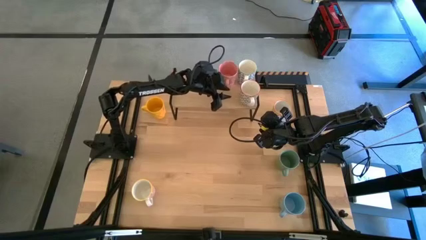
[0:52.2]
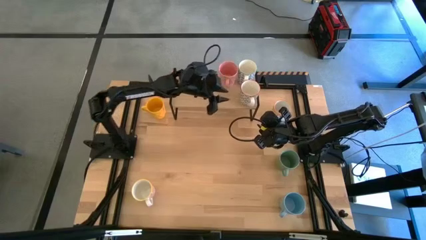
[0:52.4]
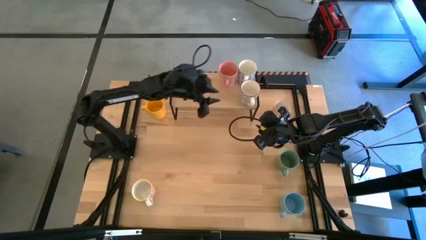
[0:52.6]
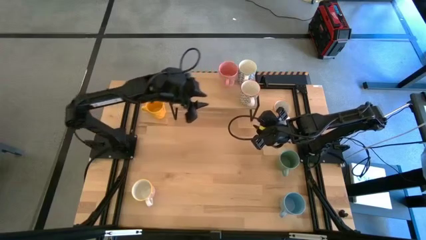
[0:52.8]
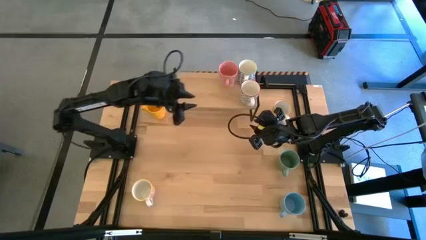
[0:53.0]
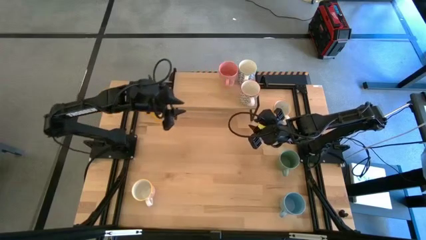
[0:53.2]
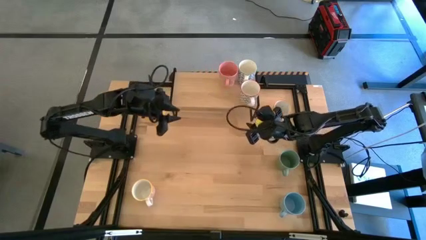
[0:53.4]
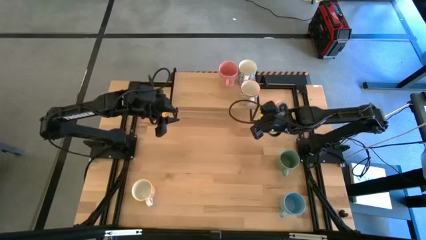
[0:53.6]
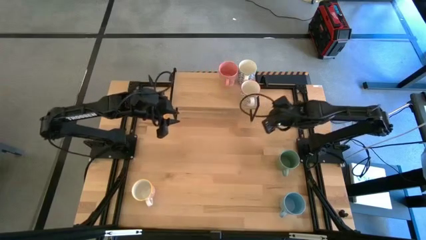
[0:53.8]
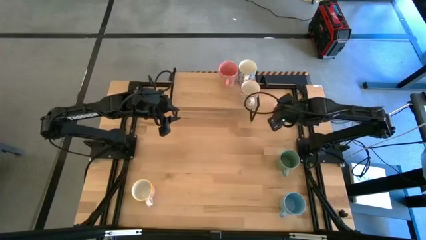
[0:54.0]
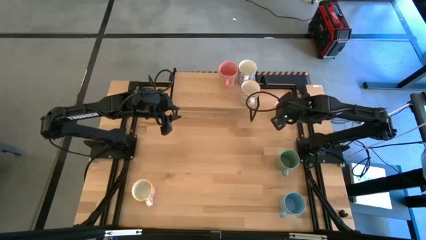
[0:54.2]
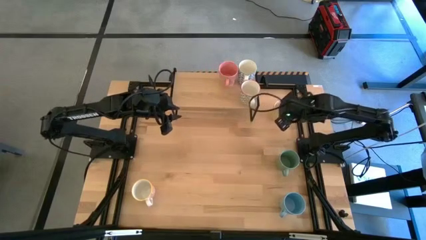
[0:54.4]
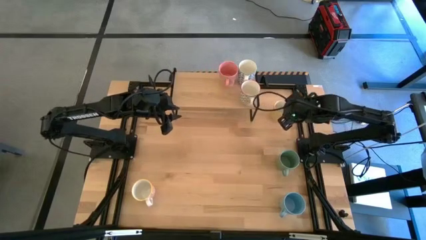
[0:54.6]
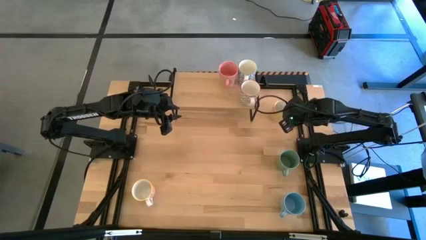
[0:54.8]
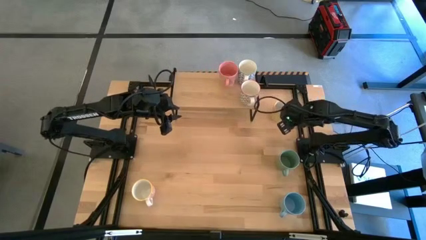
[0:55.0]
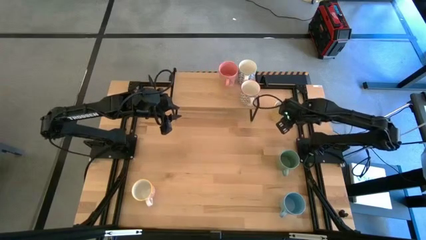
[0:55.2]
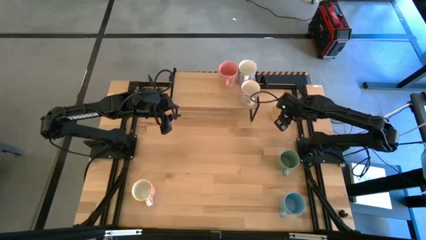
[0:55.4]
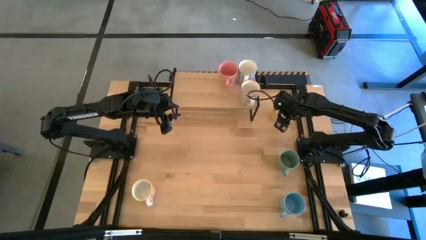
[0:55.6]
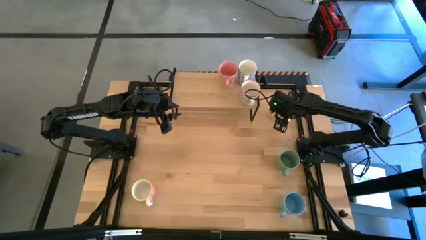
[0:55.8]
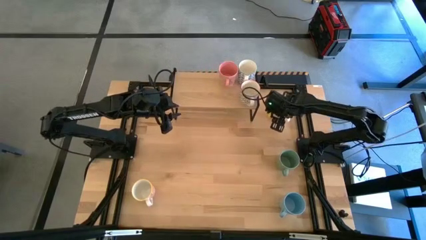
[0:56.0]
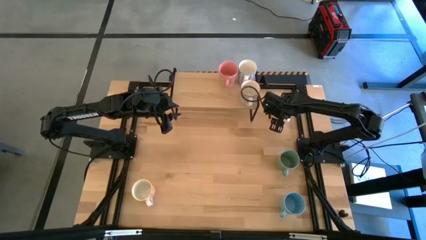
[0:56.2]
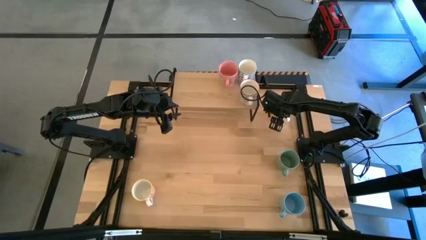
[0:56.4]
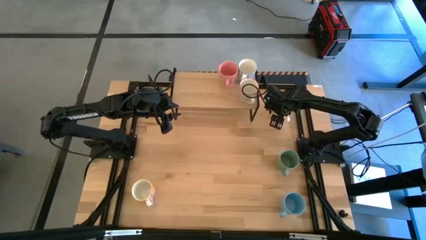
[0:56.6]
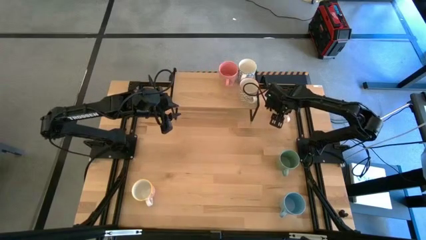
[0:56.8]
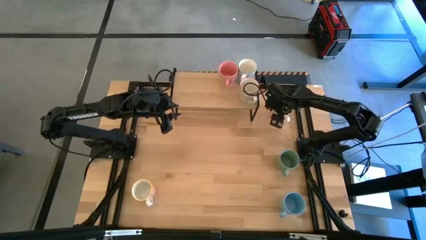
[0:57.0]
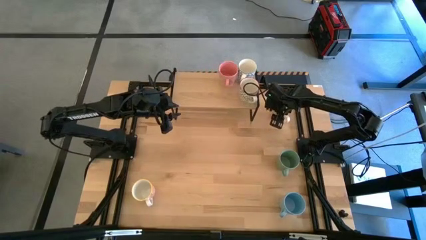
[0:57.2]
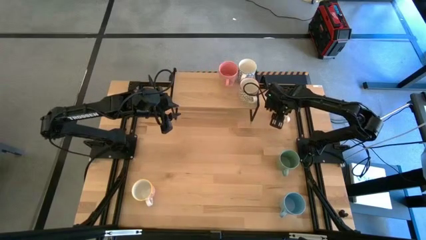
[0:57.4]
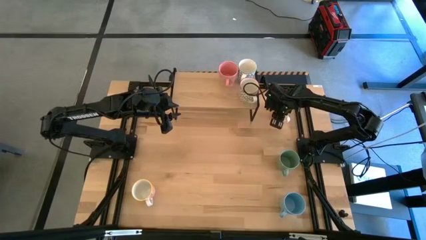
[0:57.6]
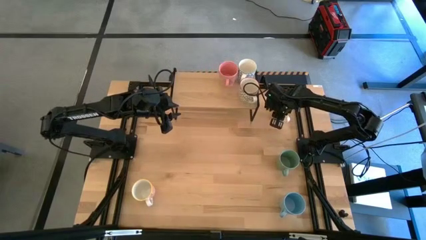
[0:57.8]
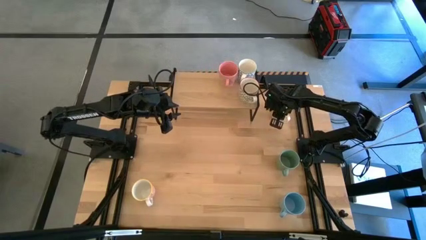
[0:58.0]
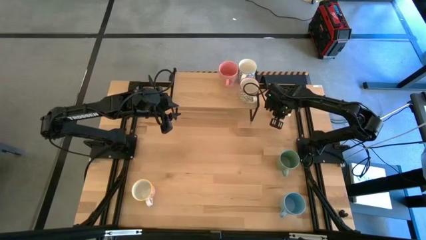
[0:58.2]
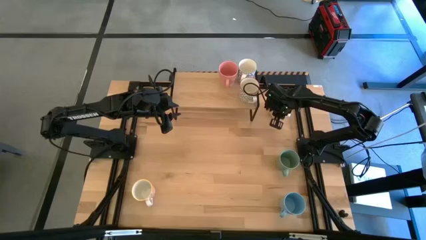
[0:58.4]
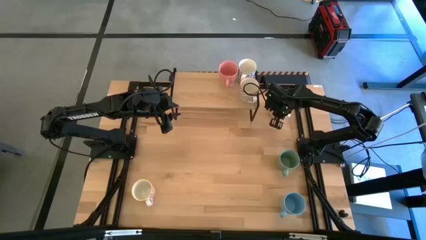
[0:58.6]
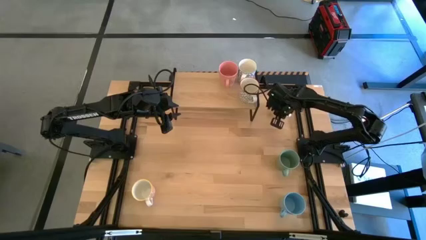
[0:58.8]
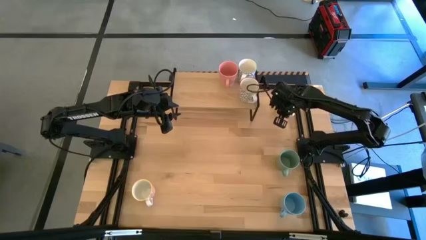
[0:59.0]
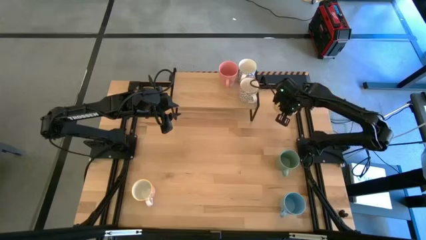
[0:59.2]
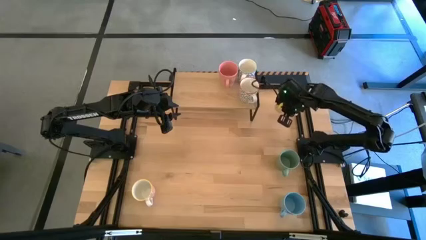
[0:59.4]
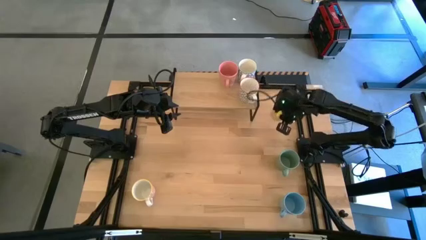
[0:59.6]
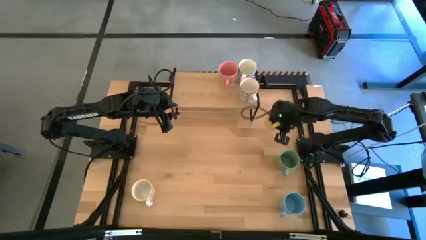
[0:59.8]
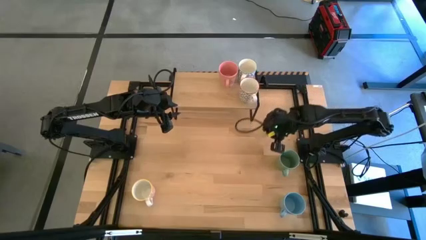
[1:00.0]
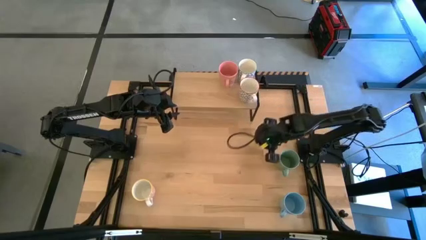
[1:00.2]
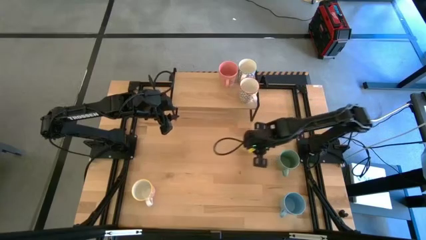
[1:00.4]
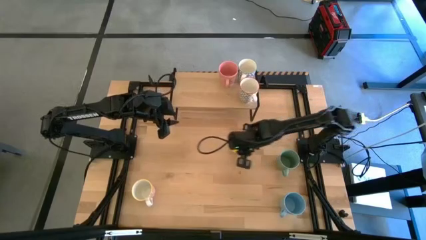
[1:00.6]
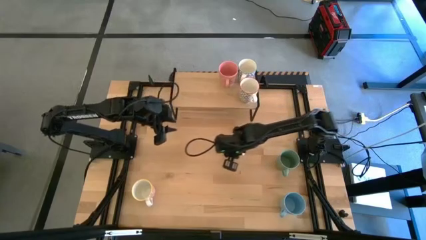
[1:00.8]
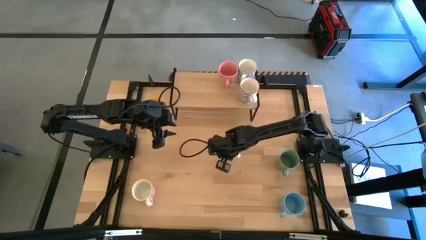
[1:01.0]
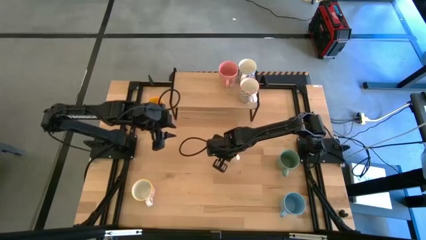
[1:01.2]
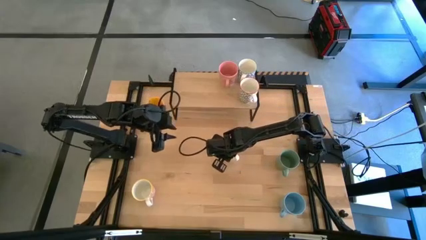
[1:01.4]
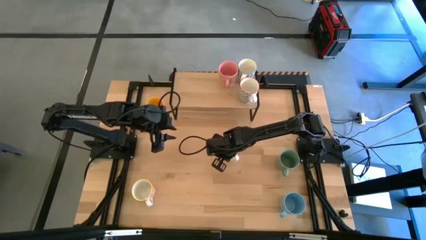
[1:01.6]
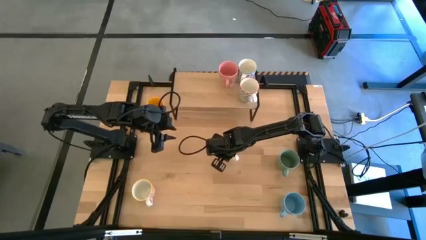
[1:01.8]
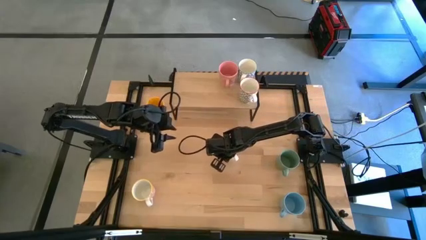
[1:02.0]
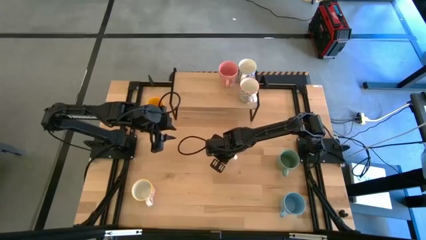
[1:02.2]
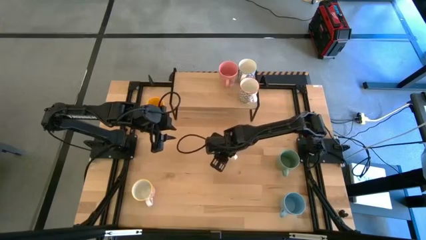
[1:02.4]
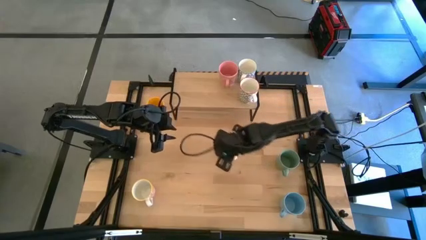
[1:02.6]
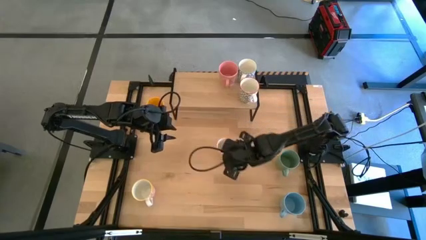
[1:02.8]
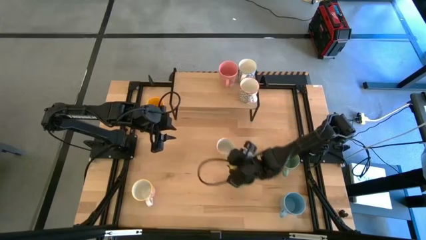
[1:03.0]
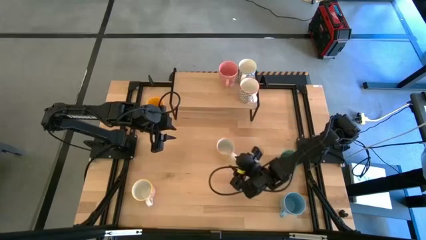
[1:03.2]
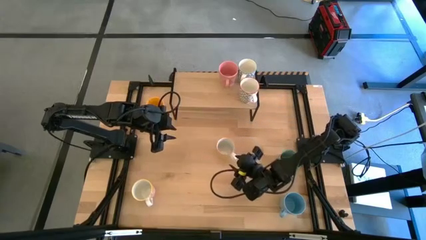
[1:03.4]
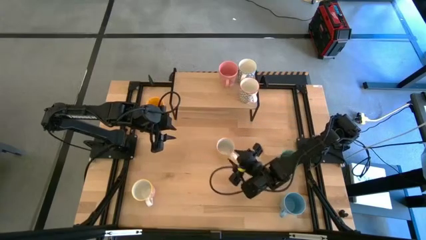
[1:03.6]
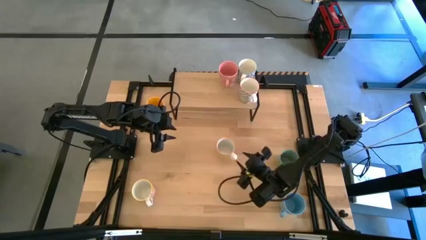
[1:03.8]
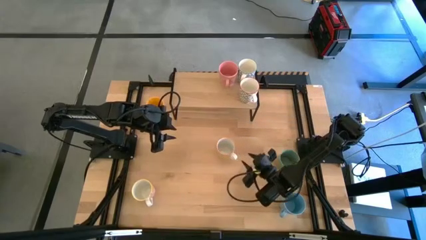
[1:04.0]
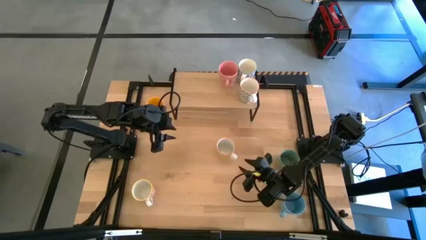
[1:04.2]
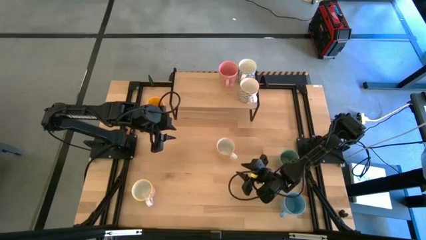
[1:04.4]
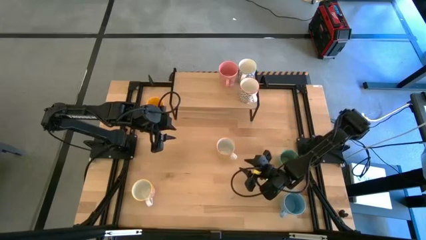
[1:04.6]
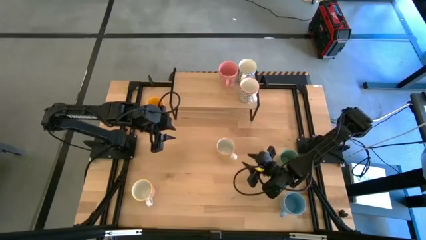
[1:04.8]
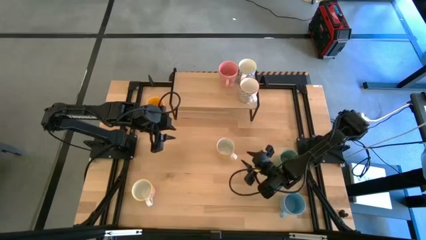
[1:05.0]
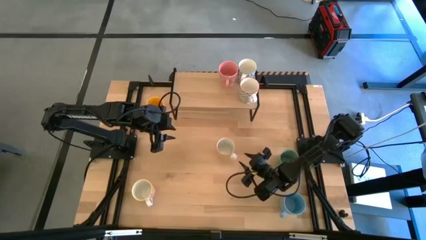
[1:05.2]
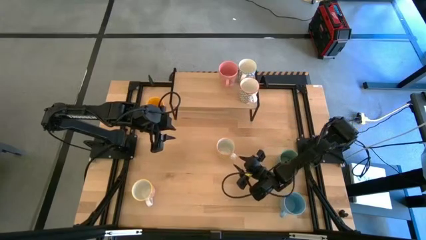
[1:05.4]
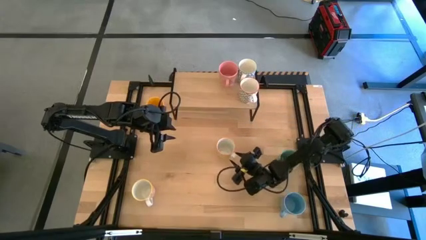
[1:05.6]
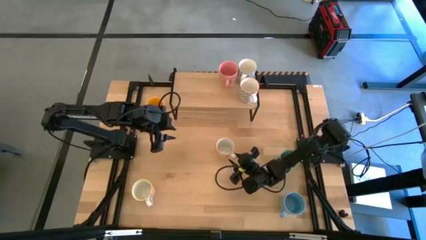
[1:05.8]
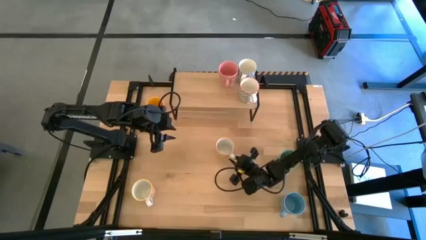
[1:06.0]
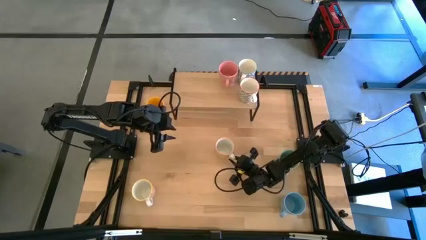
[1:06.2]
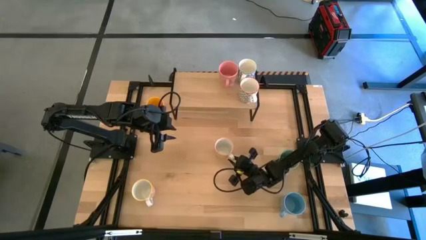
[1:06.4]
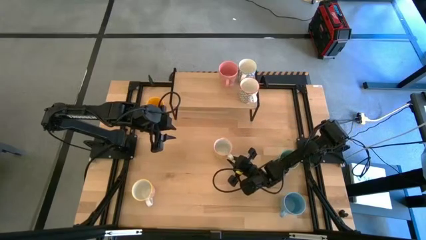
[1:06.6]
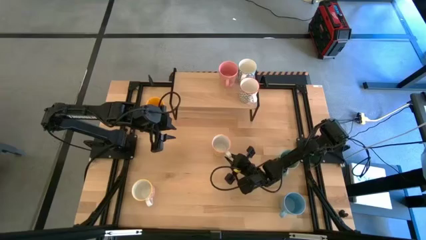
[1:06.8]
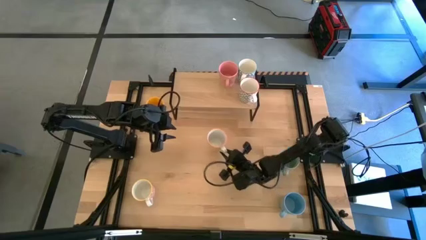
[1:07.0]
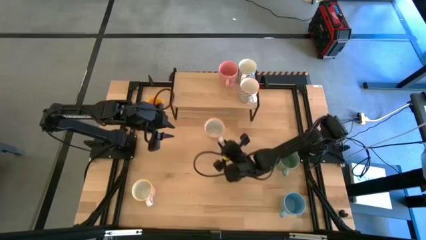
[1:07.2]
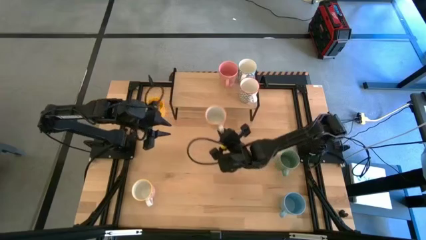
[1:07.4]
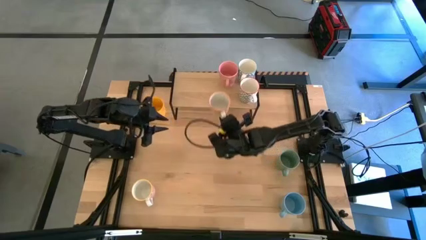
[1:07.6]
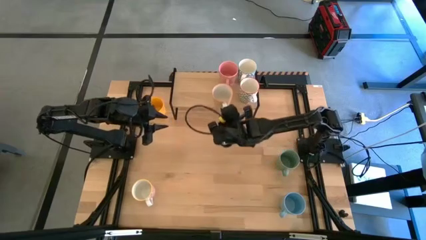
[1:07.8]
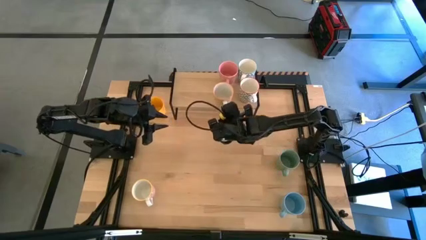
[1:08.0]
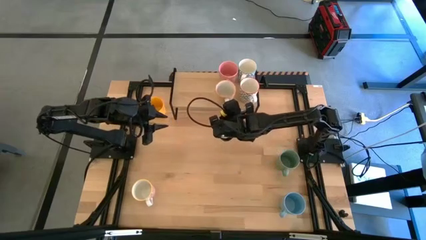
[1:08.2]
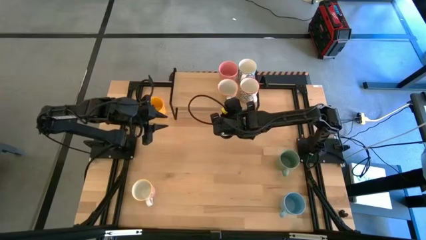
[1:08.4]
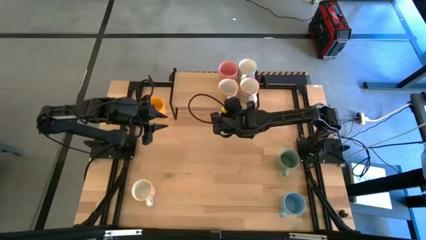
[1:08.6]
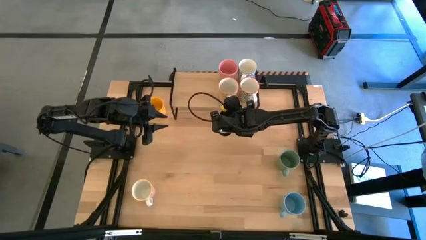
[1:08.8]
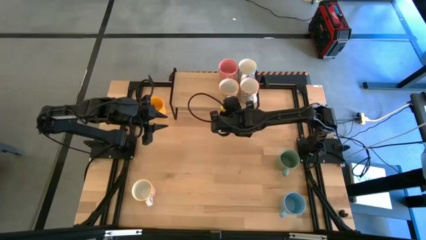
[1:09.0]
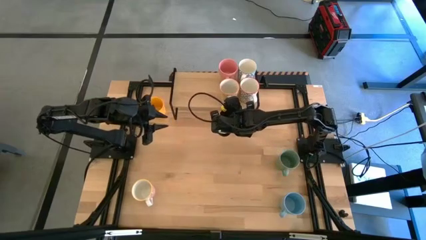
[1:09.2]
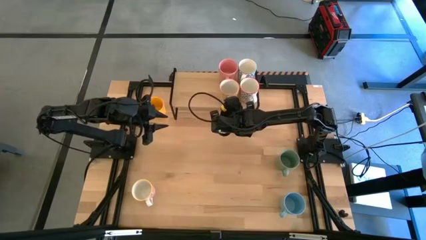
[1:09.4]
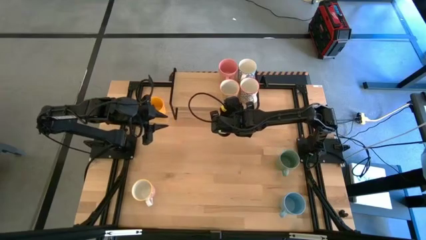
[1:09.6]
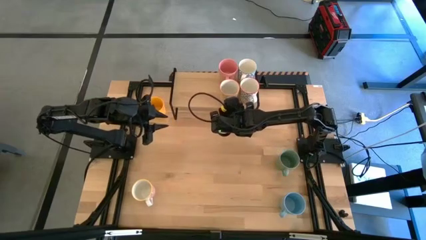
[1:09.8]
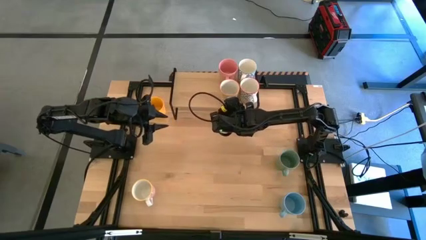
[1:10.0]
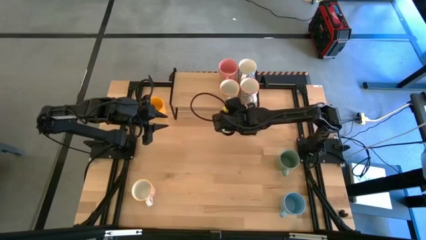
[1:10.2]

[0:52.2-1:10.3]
Task: Place coffee mugs
Put the yellow patterned mug on the shelf
